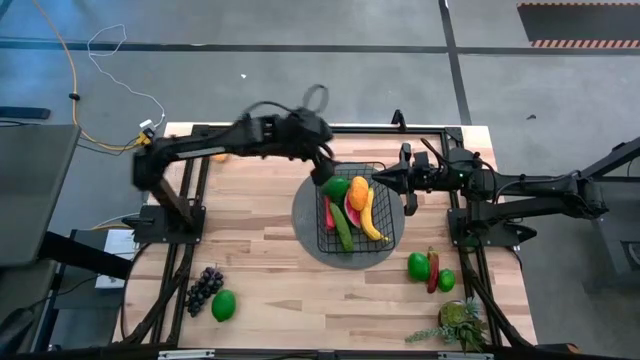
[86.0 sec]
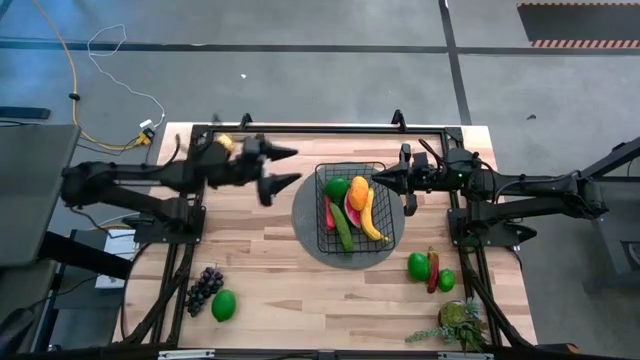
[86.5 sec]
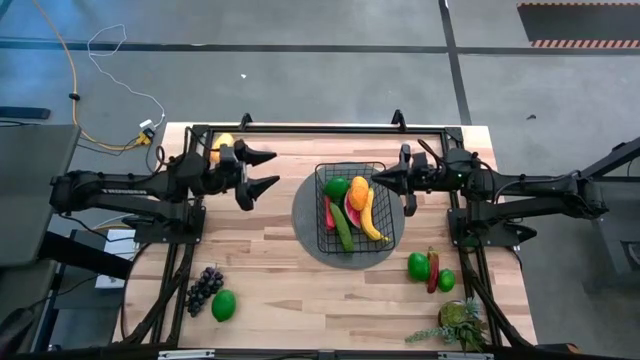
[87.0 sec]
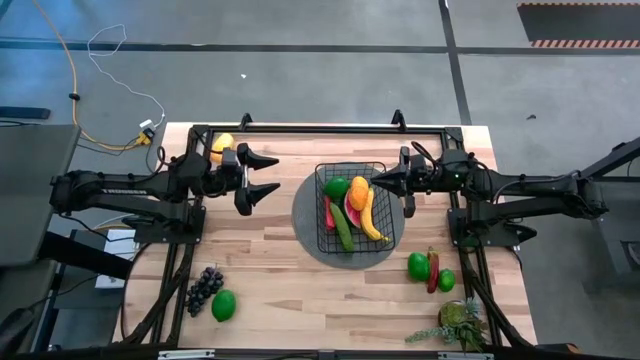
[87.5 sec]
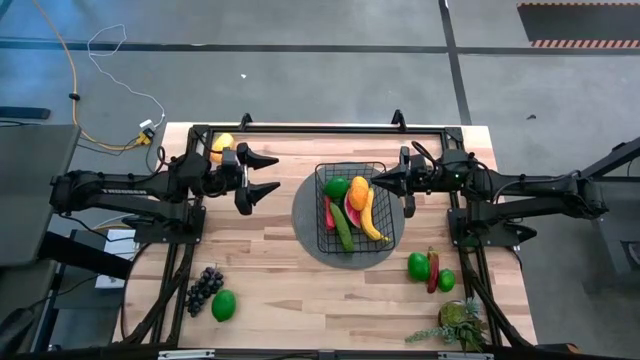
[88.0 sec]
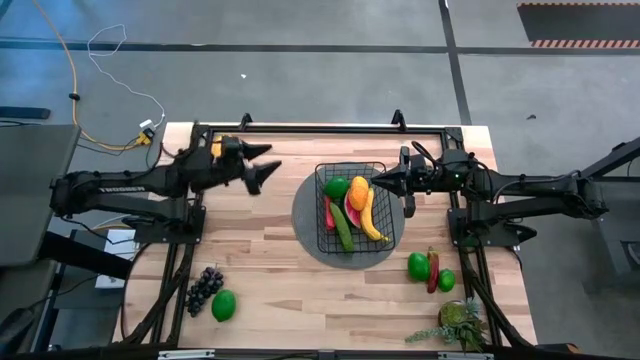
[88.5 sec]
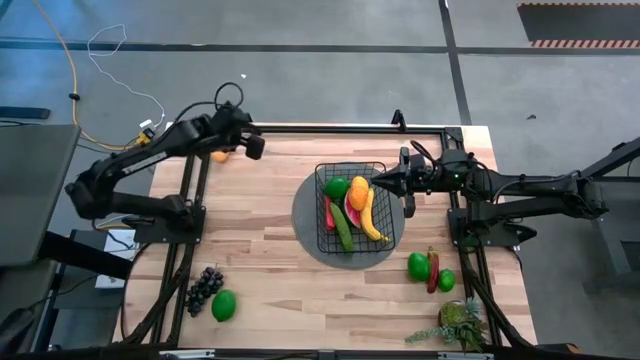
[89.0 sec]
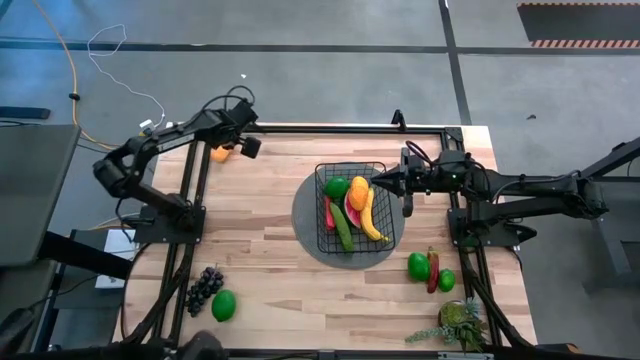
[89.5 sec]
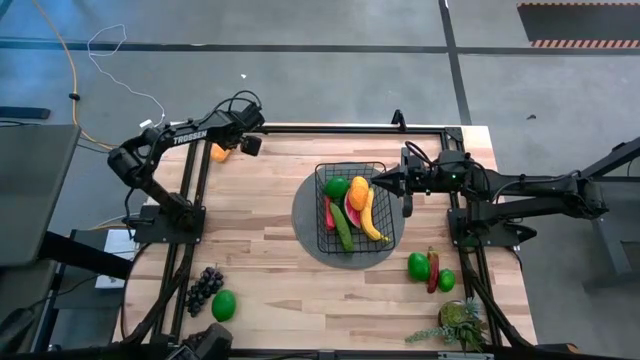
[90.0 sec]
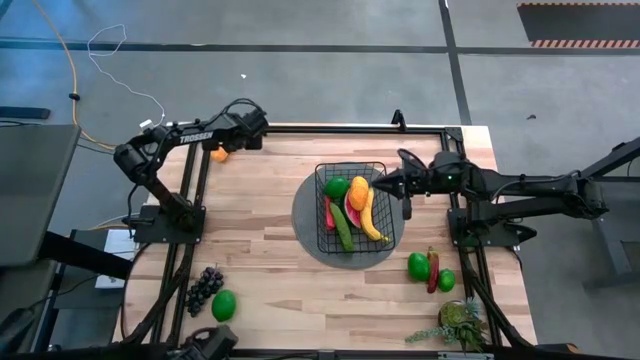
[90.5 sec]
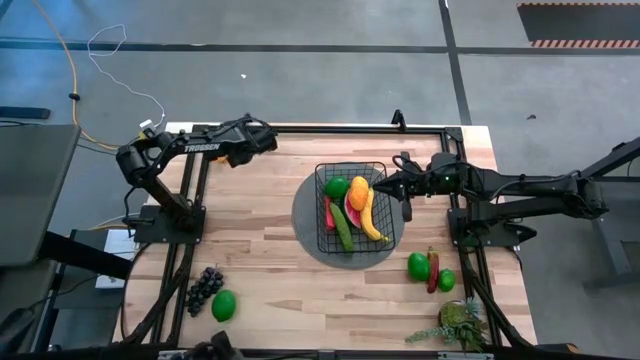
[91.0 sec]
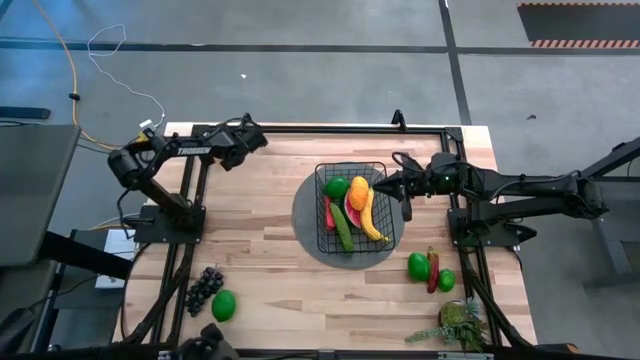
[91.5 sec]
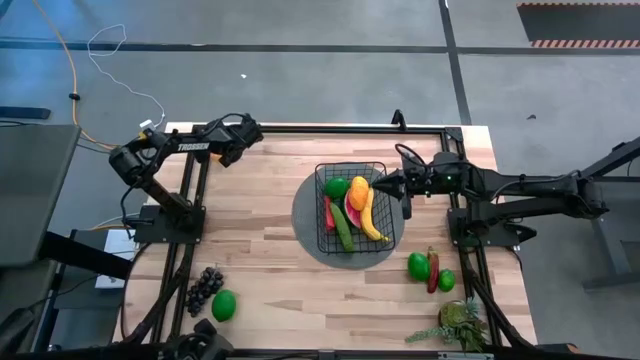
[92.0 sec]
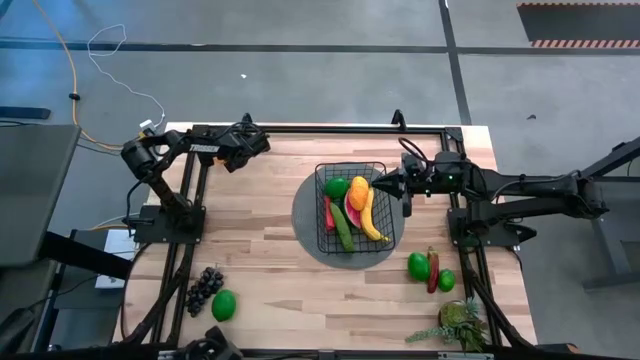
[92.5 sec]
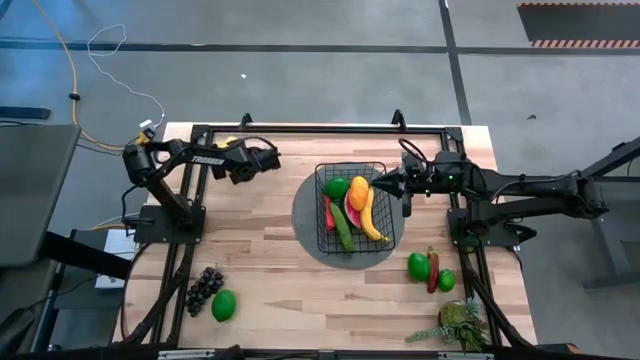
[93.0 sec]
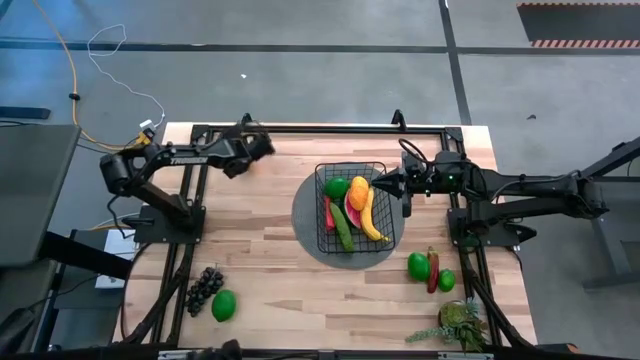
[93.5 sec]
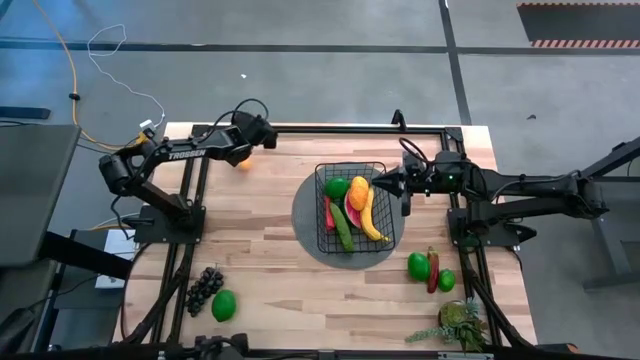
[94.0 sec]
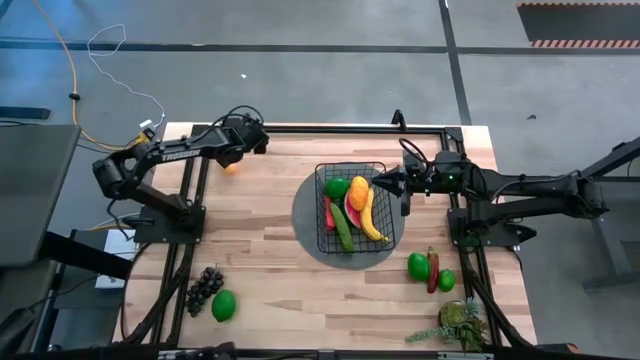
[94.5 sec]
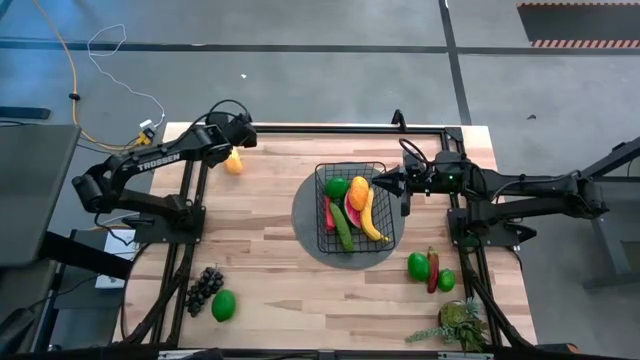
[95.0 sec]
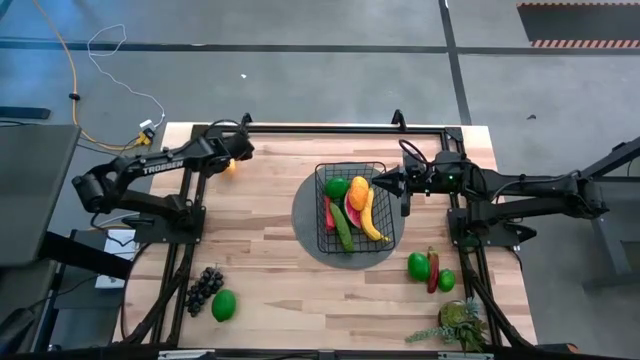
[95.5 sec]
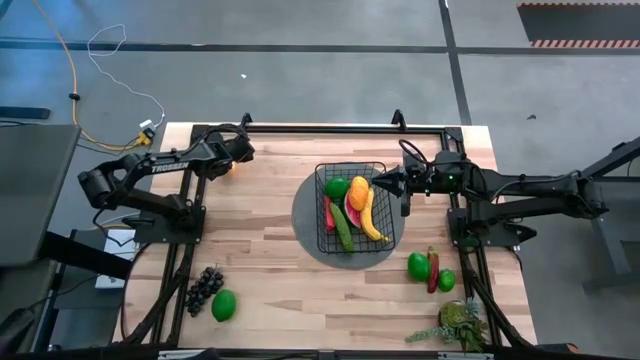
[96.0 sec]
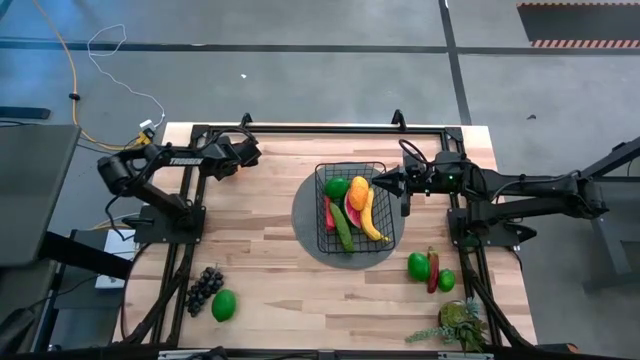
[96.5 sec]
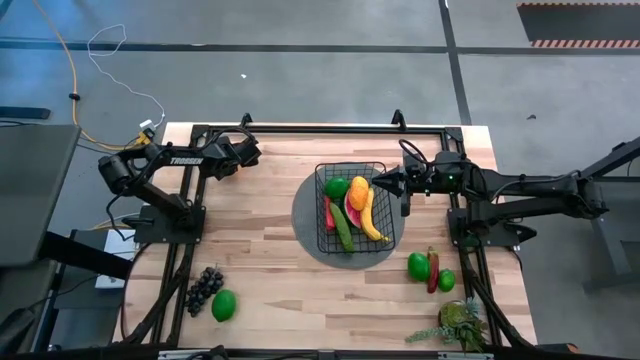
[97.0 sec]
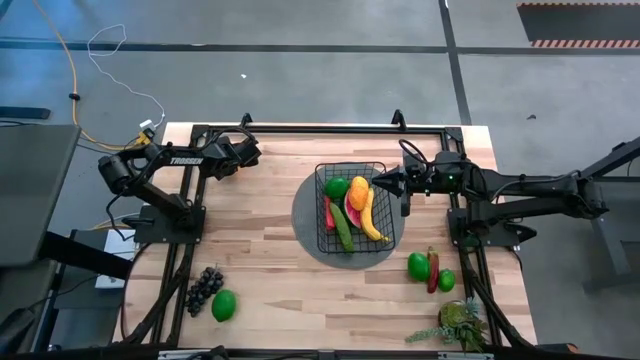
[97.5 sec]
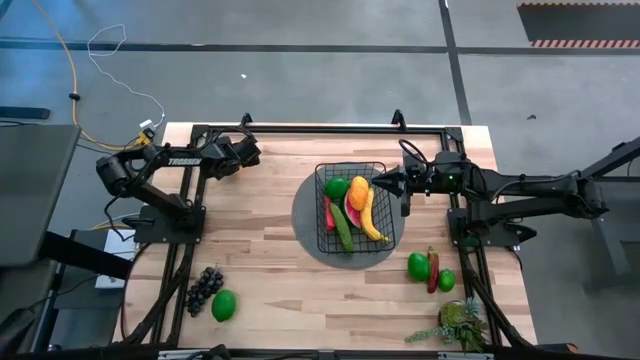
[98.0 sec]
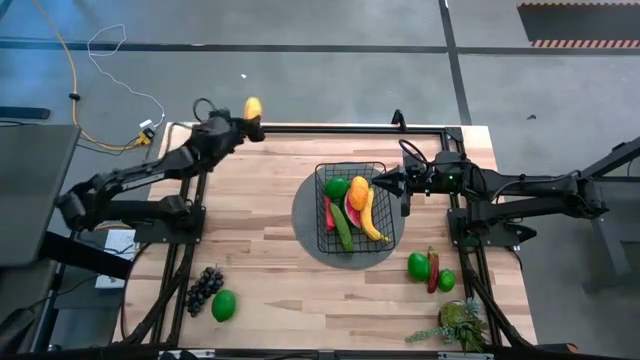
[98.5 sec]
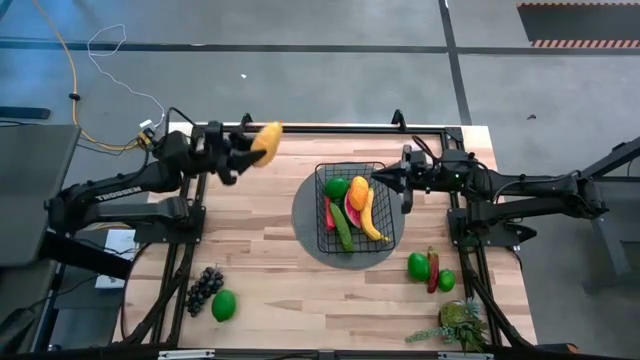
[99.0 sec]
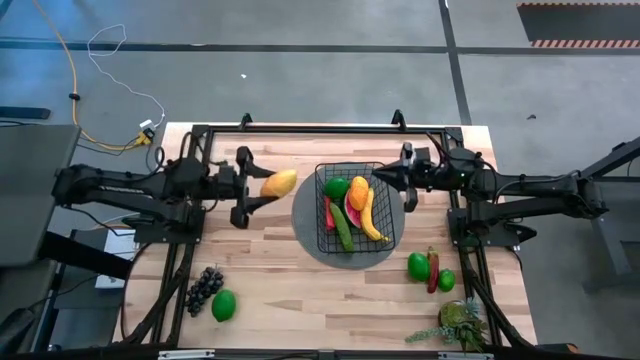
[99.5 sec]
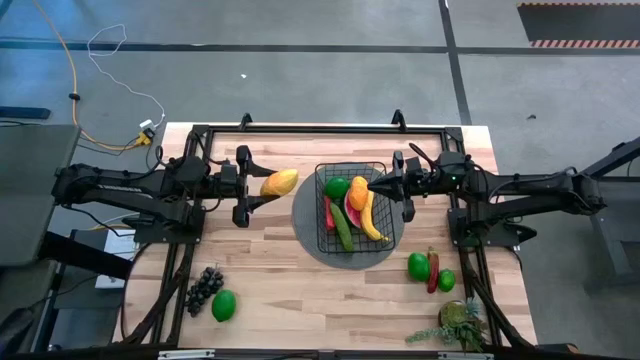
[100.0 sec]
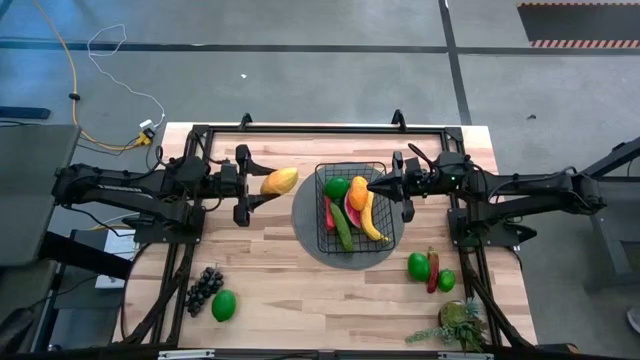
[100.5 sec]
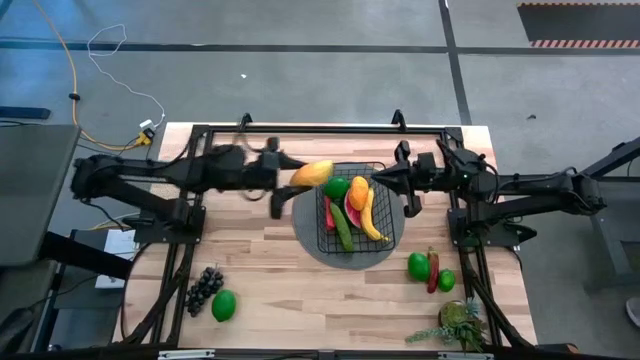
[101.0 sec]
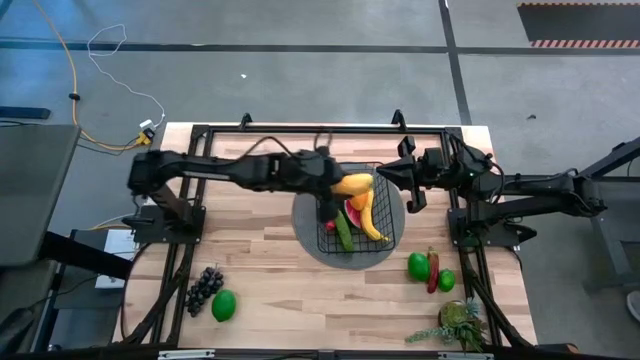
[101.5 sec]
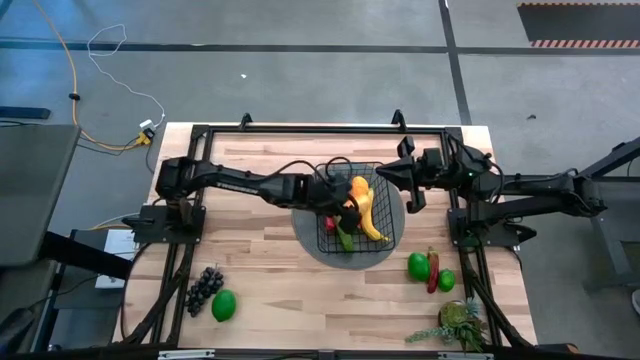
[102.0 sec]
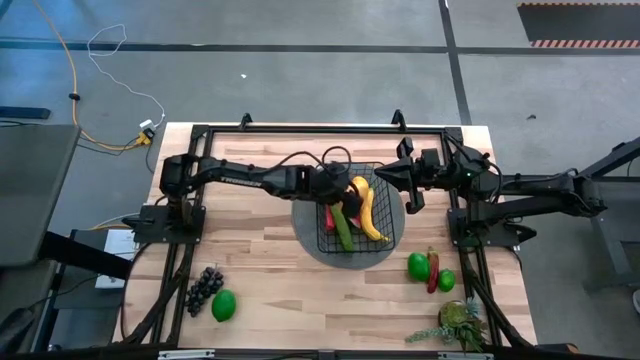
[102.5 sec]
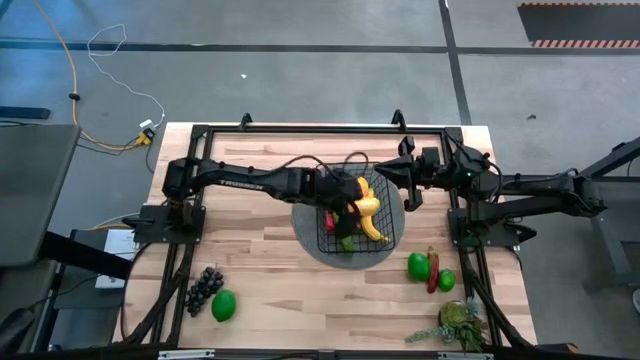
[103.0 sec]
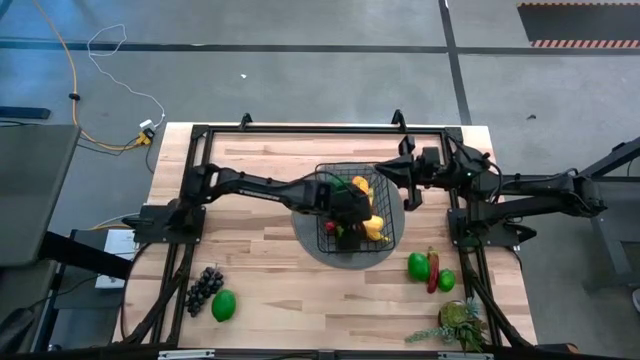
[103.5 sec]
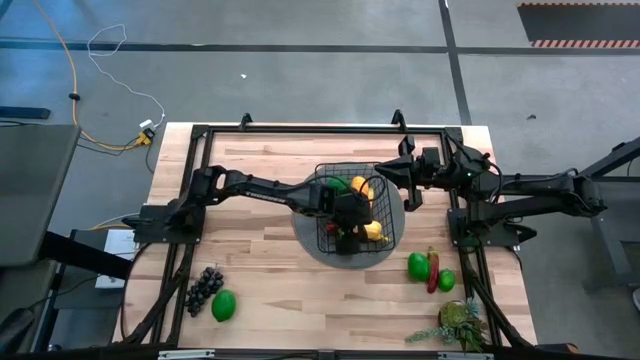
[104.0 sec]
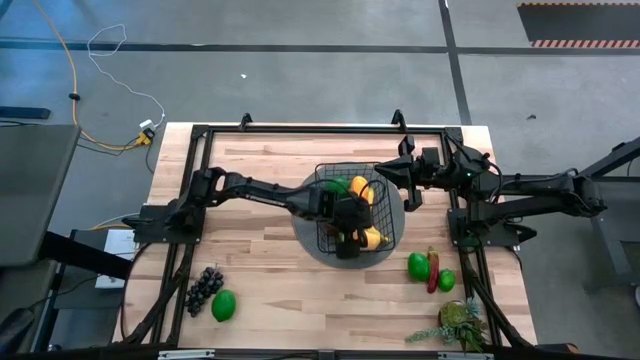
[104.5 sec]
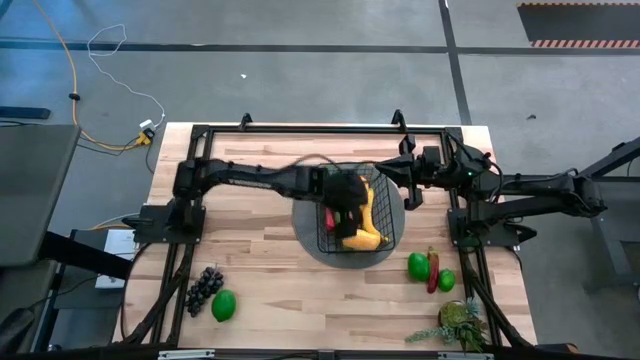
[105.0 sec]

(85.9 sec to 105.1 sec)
Task: Build produce basket
Put the yellow mango into the black wire basket
